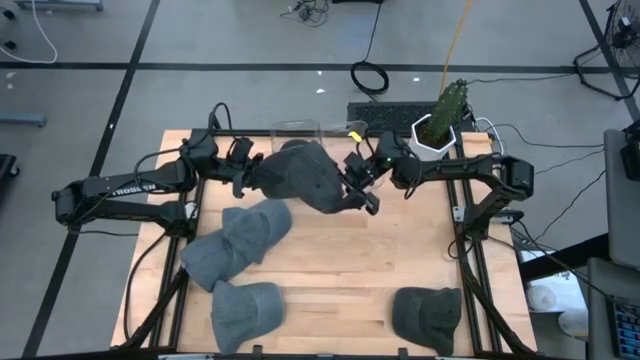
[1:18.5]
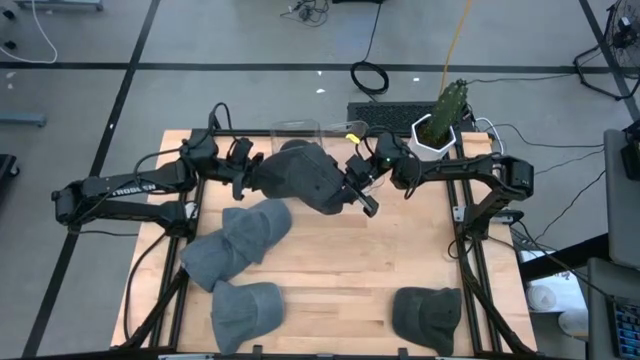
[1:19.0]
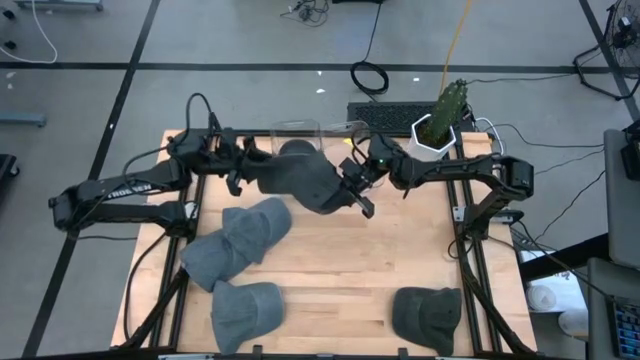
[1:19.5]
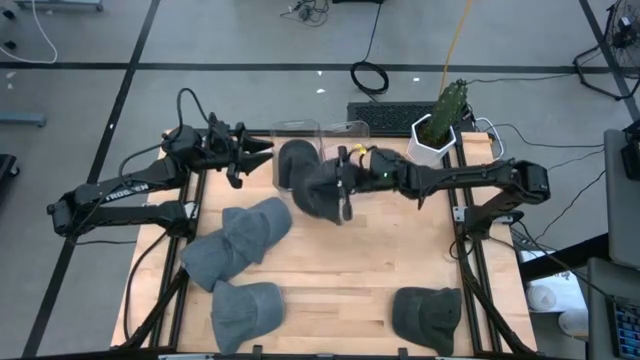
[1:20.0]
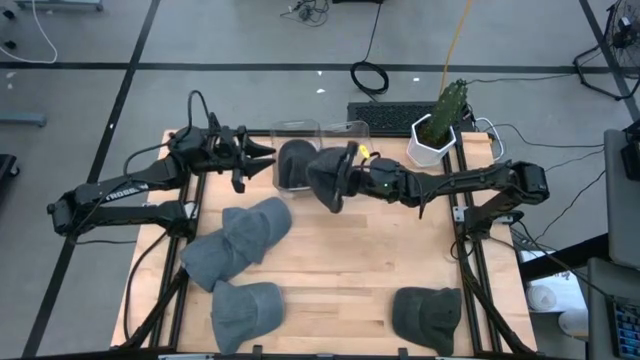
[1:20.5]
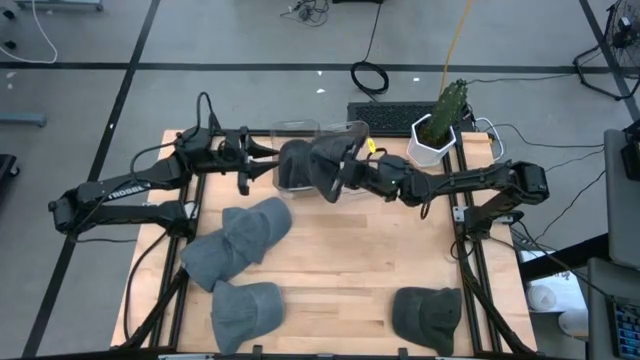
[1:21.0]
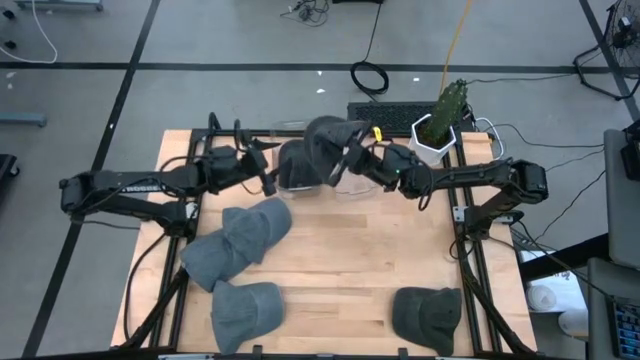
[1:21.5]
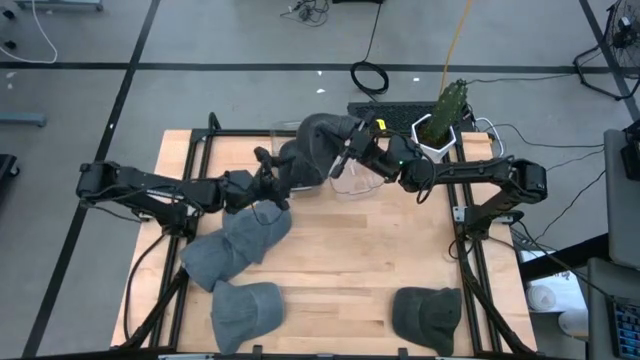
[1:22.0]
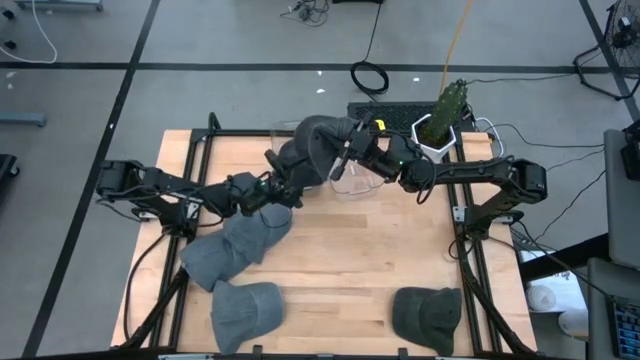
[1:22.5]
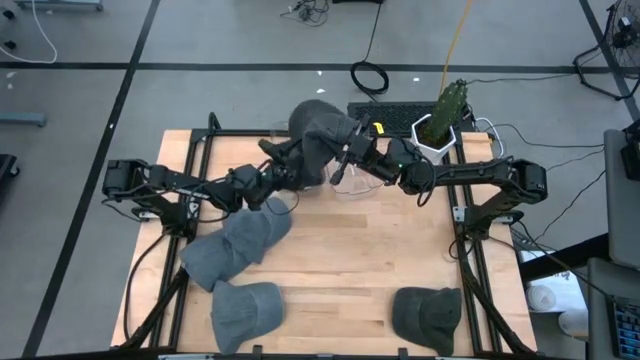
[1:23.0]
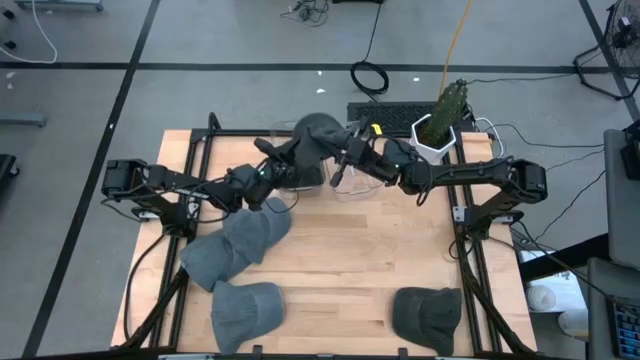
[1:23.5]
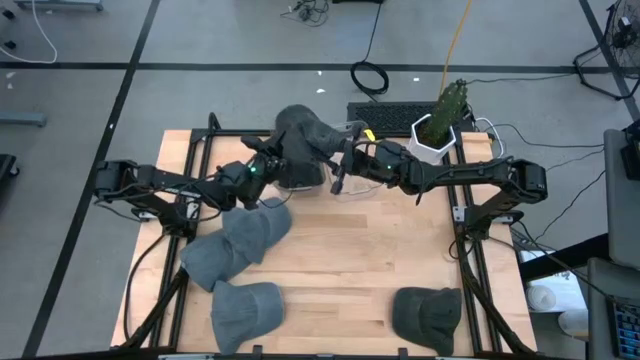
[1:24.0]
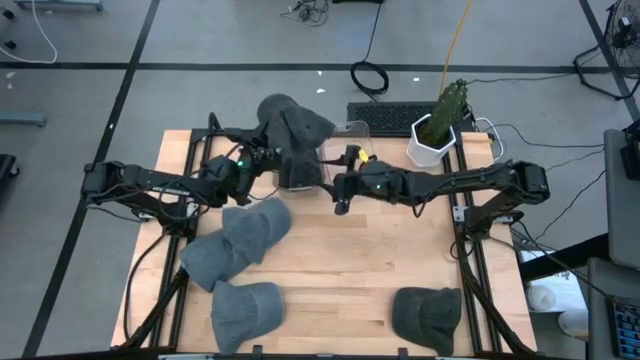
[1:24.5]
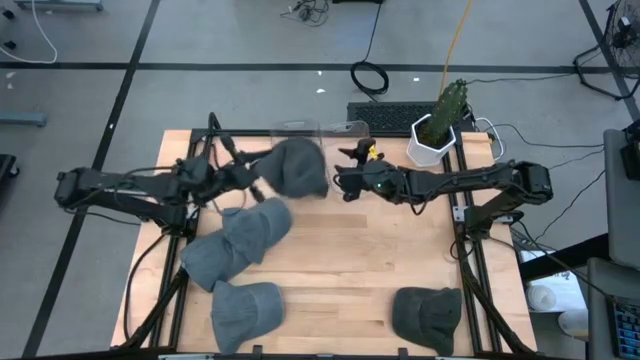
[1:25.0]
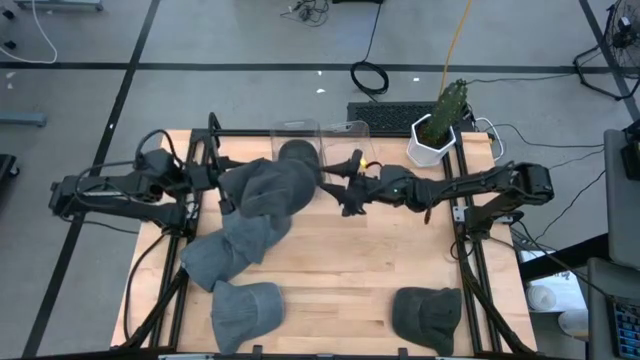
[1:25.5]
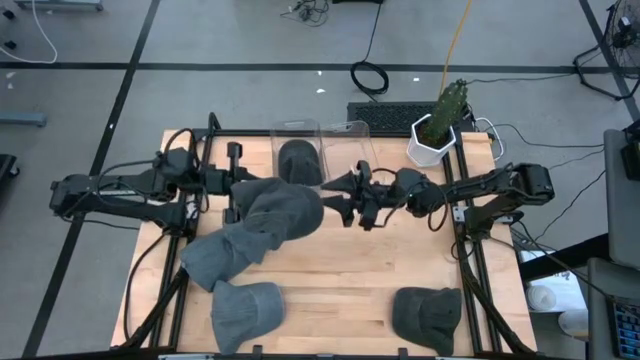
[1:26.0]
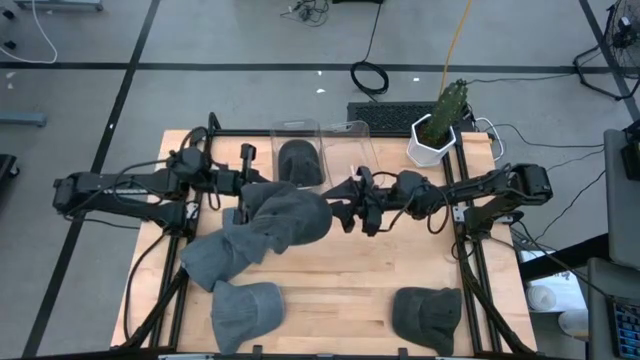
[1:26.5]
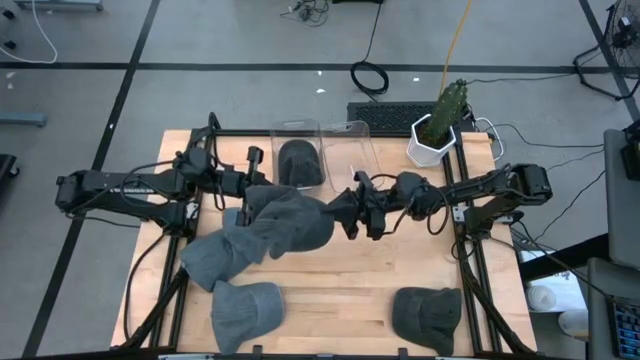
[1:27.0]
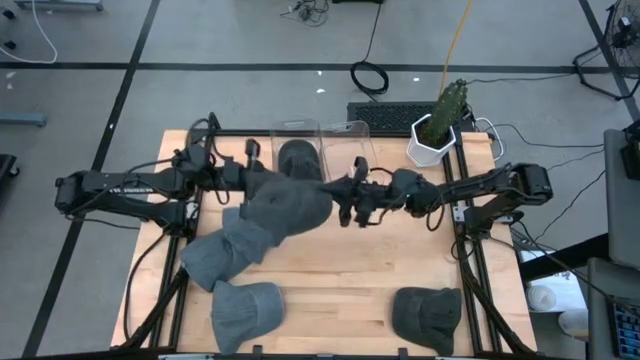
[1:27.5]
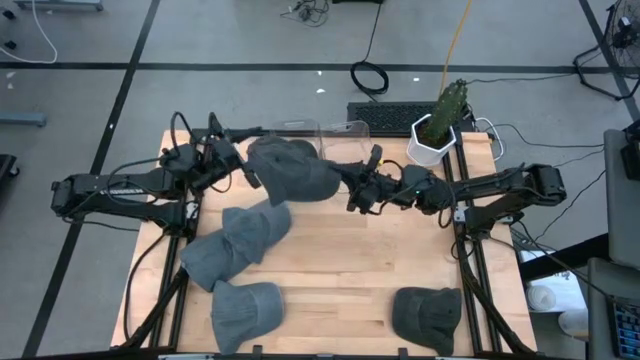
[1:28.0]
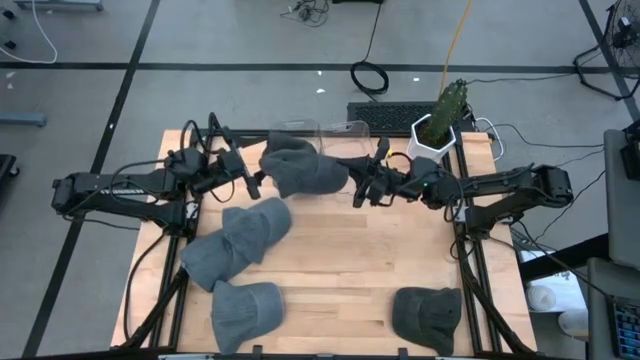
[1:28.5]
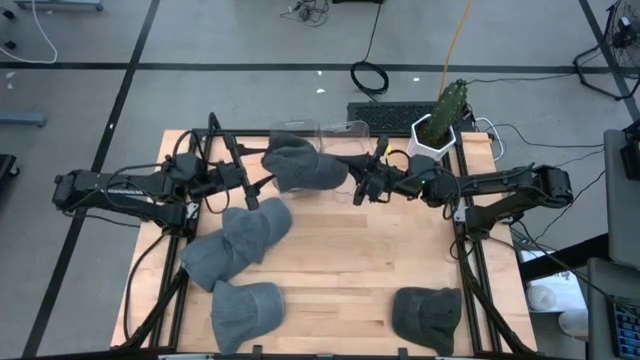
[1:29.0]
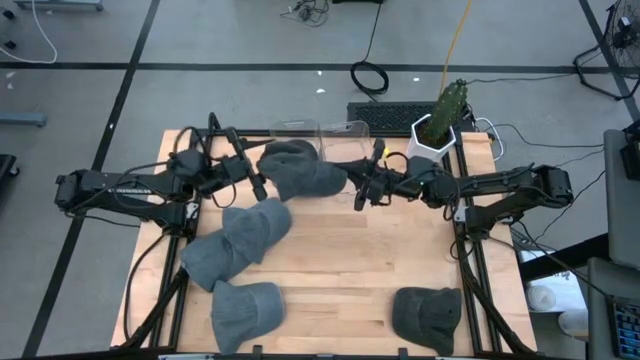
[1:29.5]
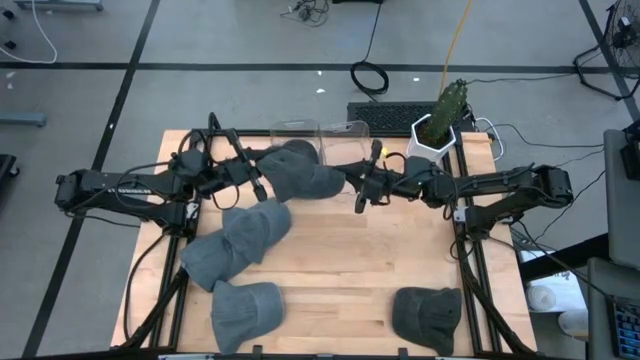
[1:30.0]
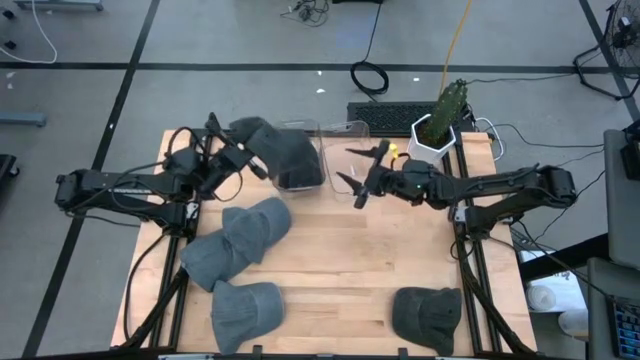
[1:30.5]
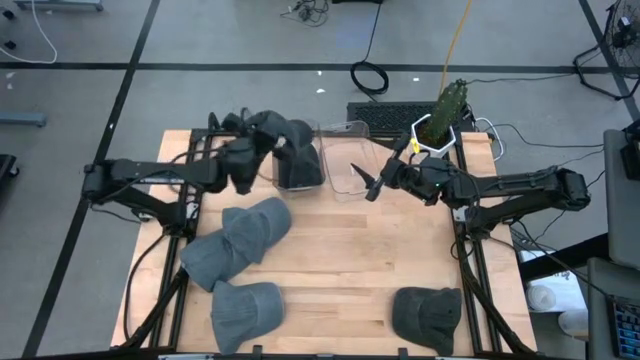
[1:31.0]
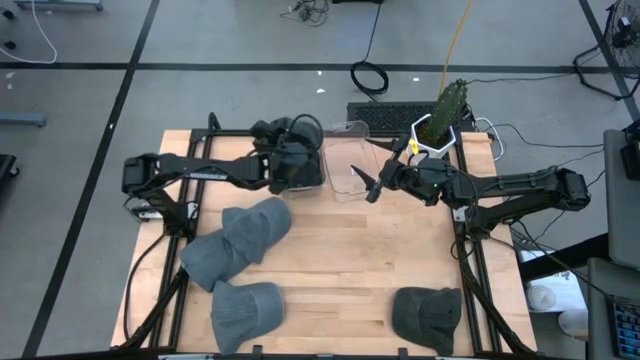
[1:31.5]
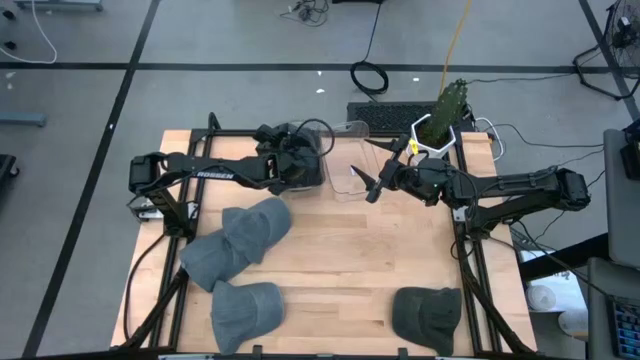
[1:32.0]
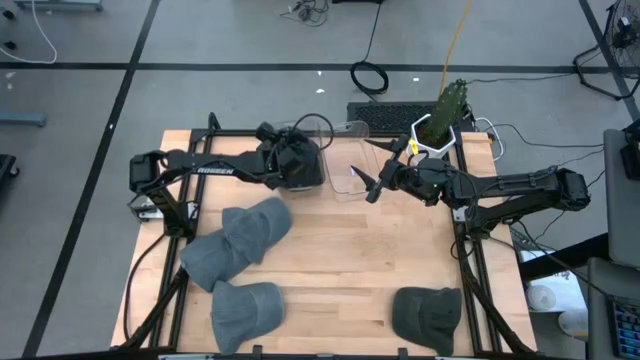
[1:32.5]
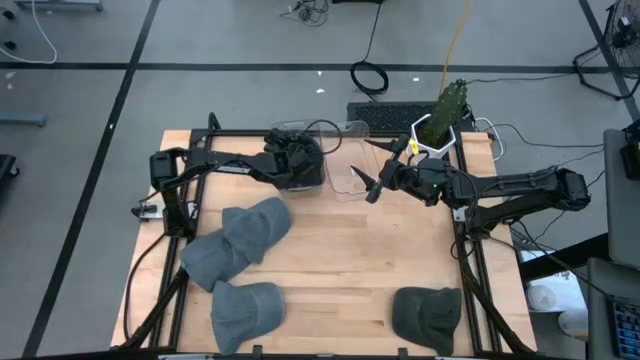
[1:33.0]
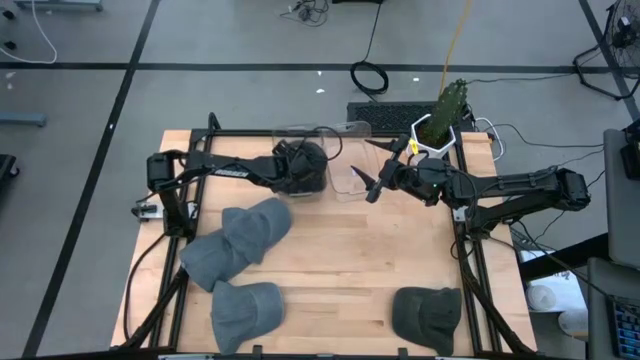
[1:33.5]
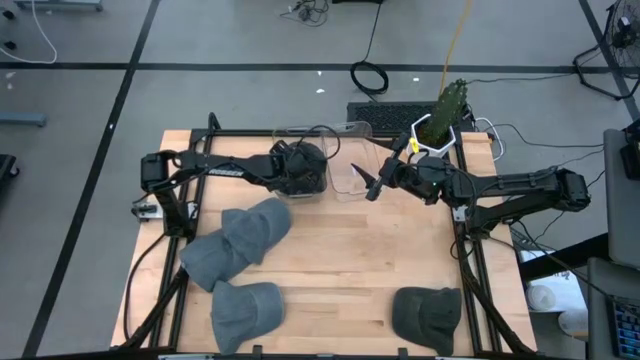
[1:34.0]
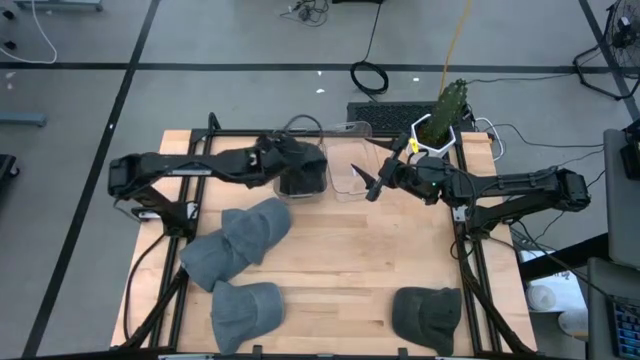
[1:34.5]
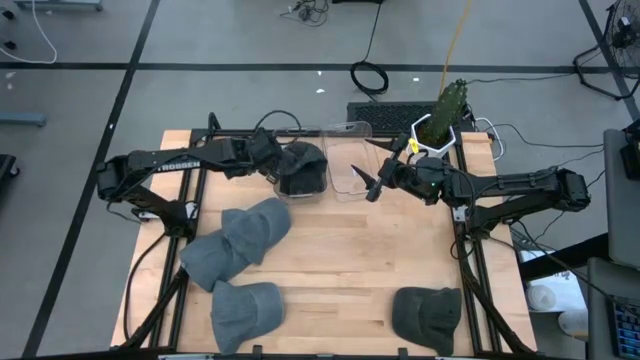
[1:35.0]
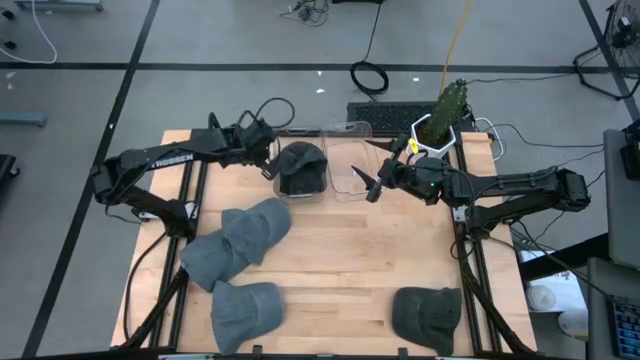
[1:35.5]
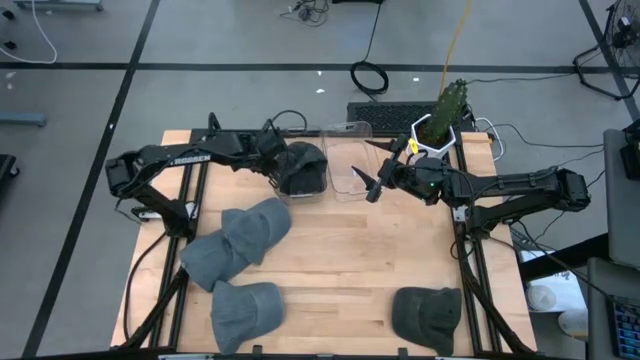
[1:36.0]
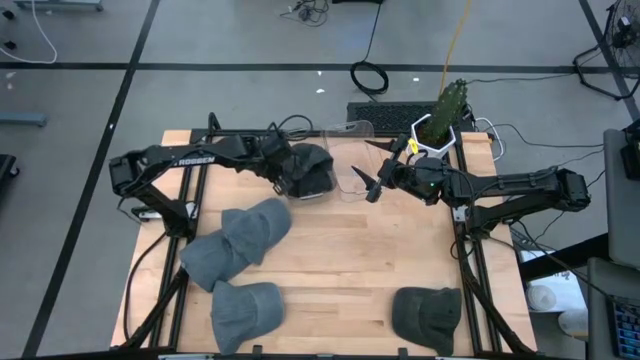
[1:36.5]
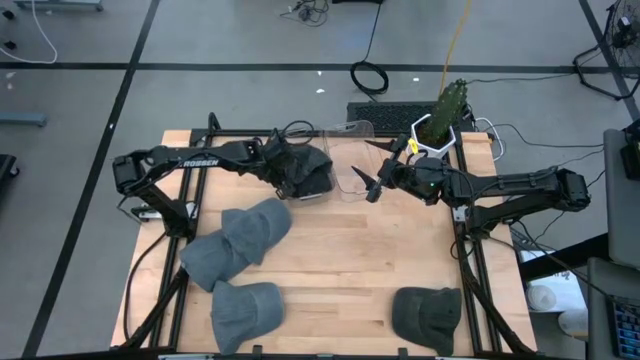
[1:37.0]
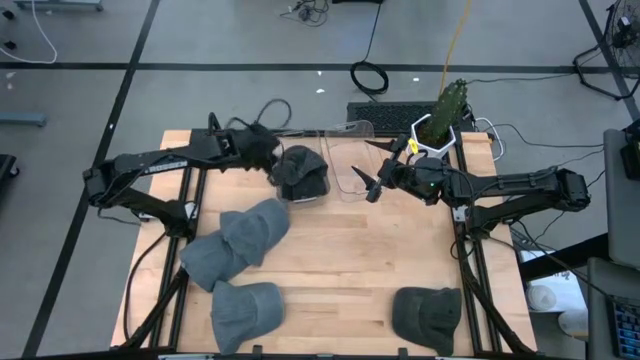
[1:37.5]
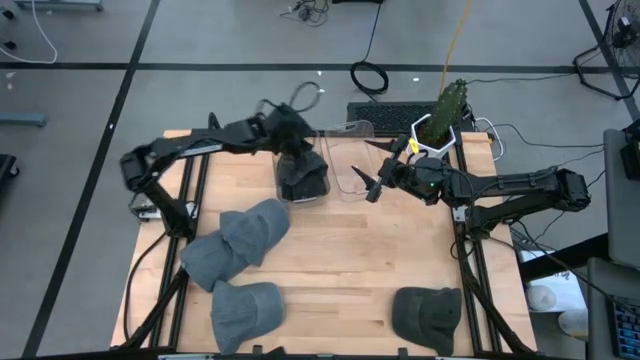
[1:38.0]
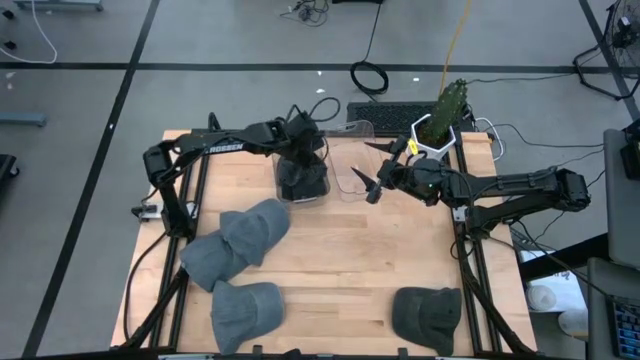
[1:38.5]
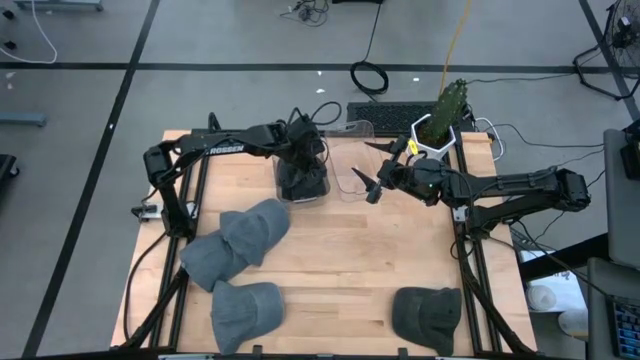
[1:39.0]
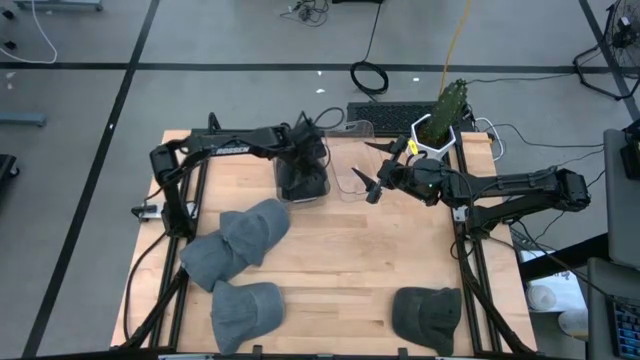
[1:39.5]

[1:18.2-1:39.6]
Task: Pick & Place hat
Put the top black cap into the left transparent bin
